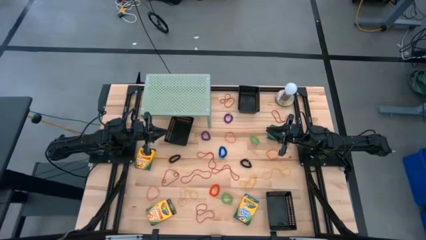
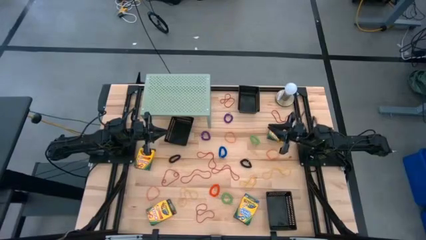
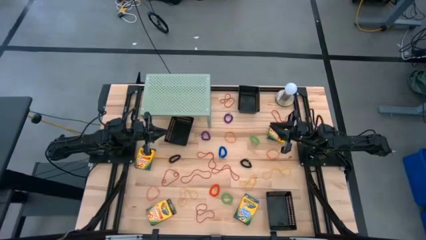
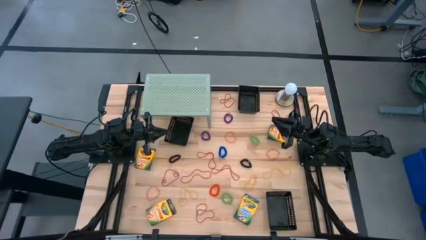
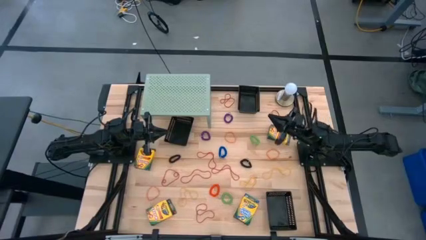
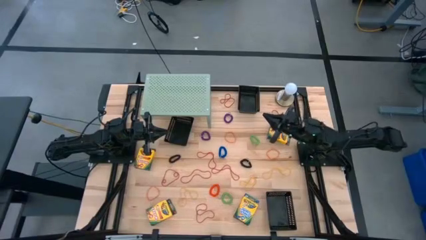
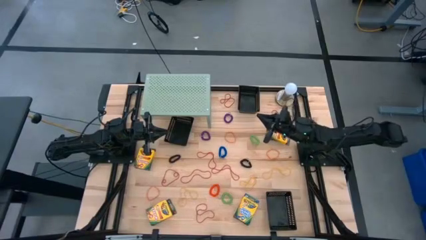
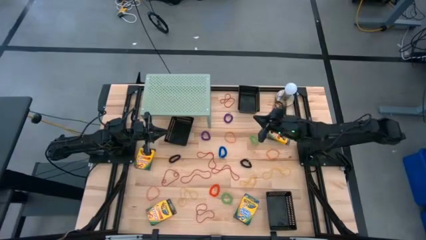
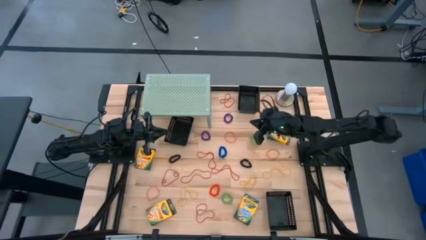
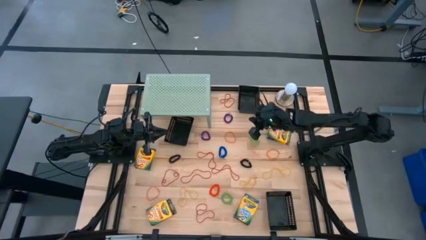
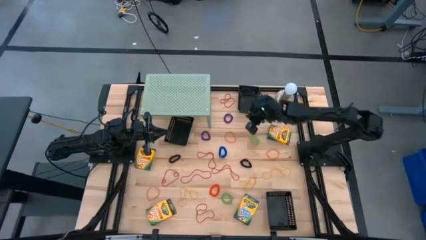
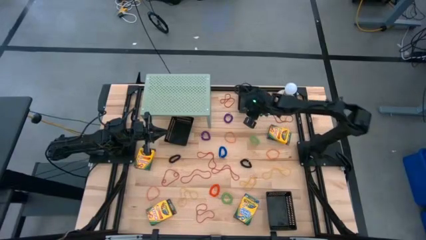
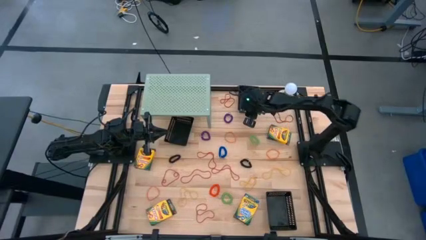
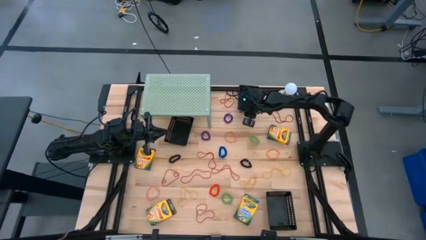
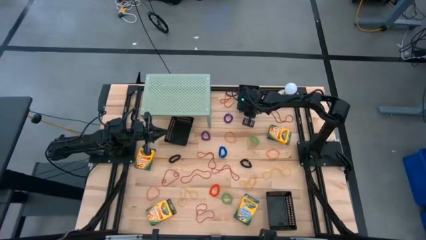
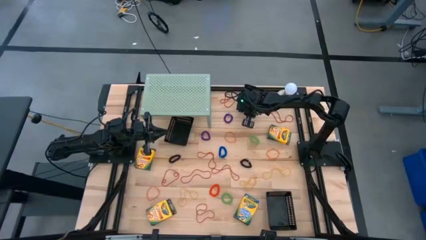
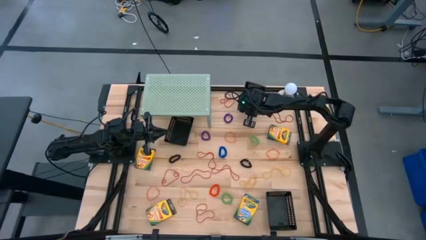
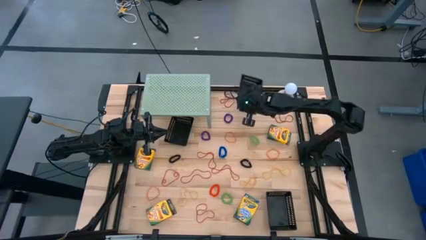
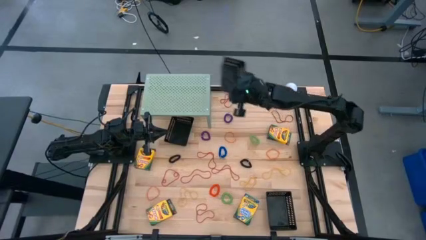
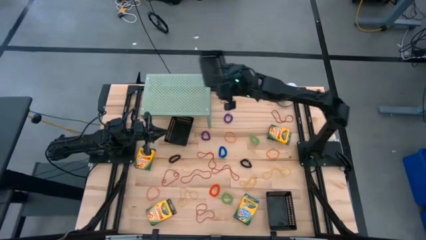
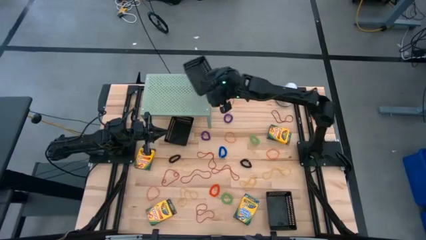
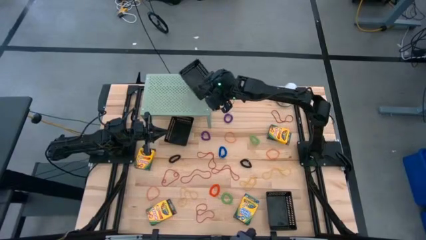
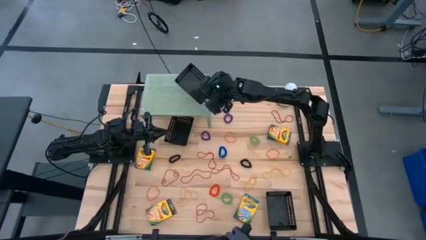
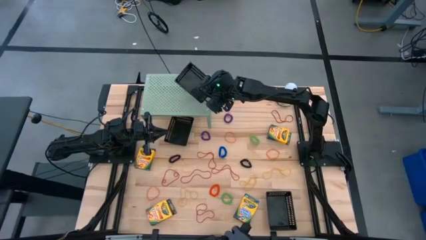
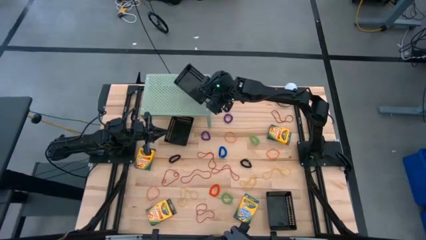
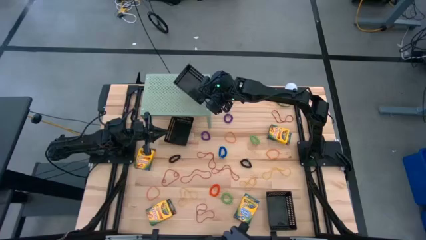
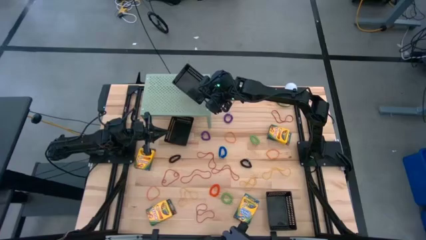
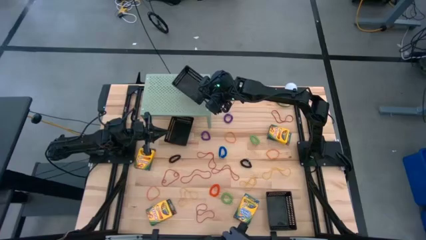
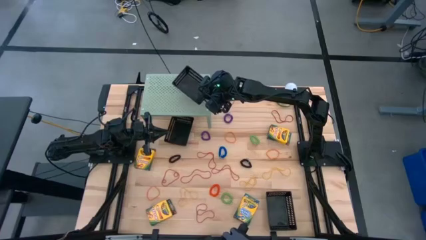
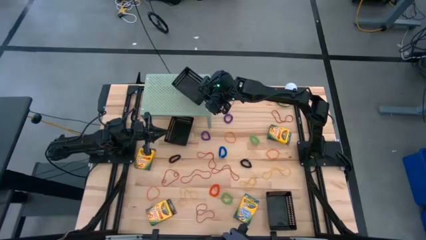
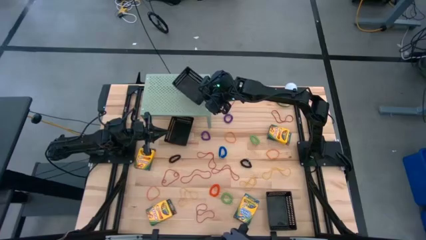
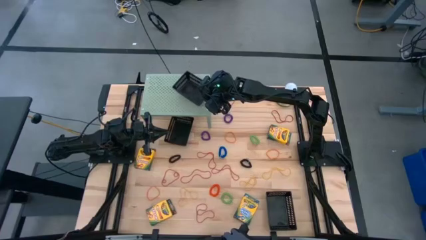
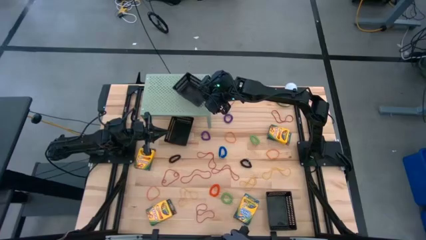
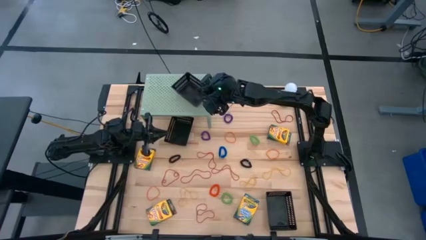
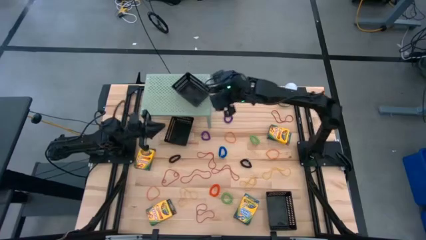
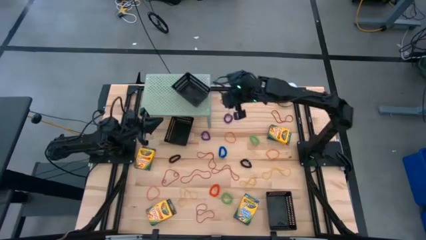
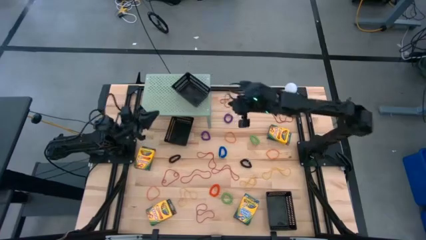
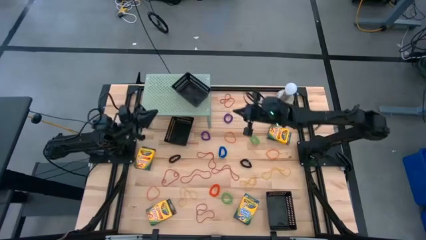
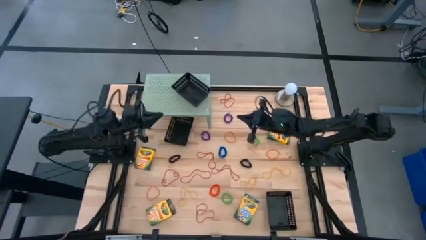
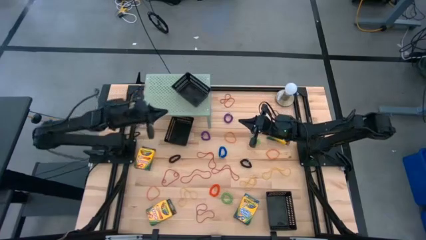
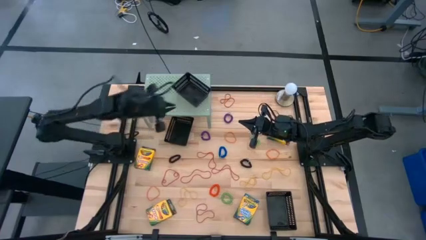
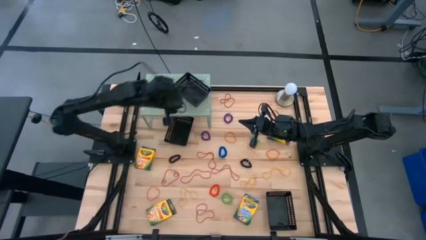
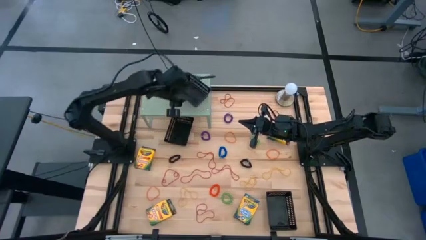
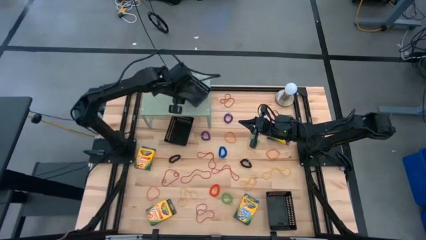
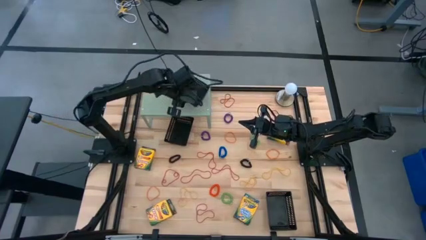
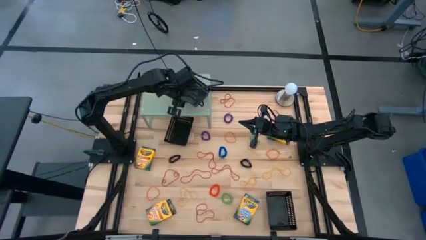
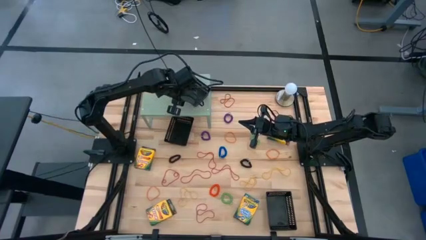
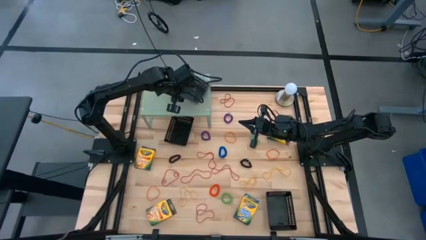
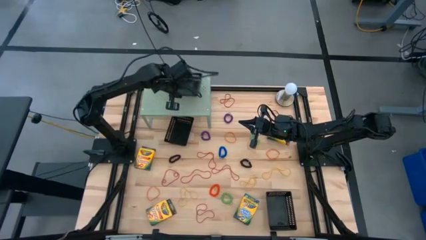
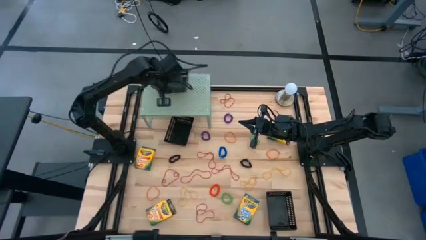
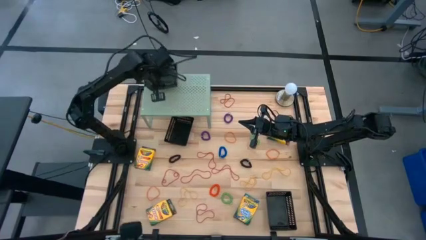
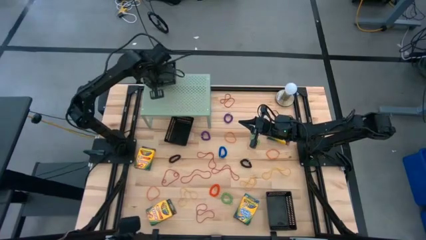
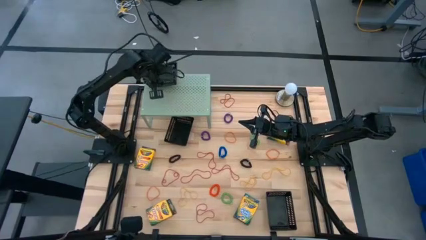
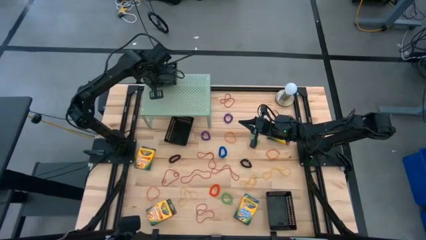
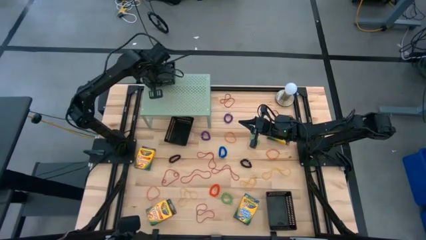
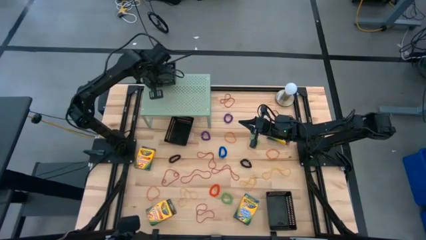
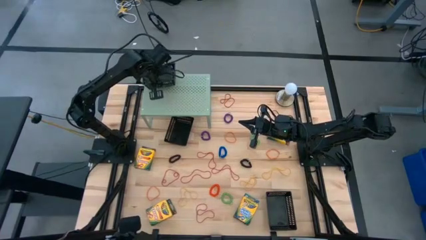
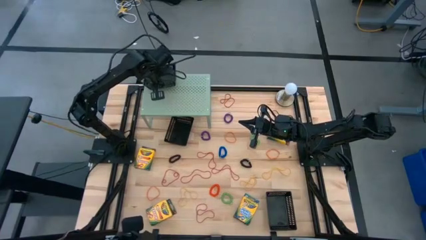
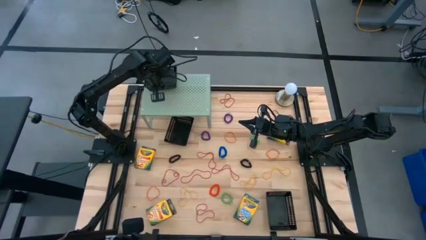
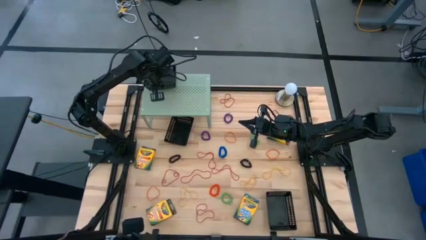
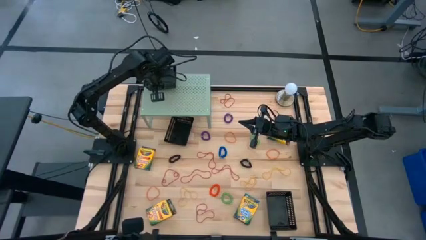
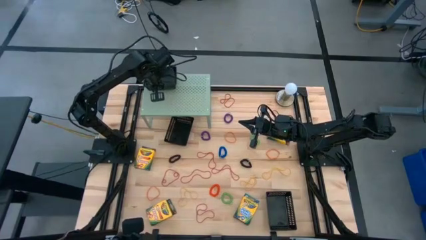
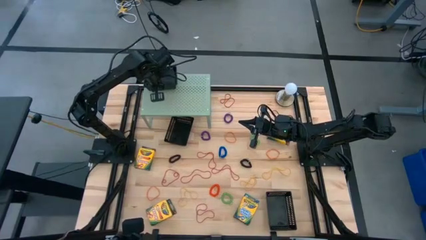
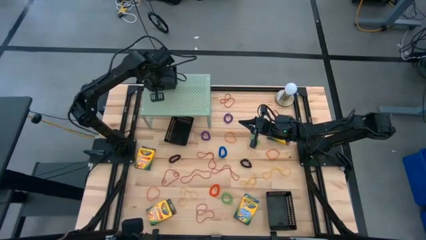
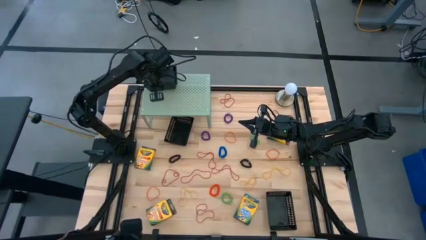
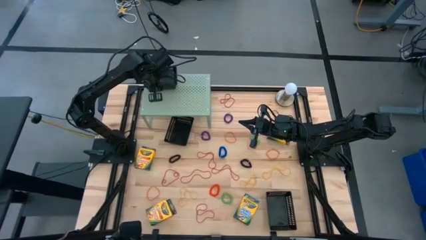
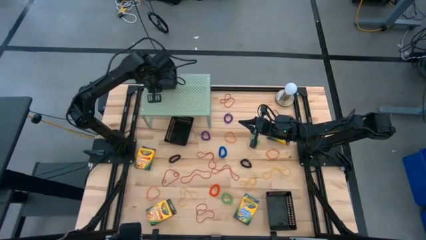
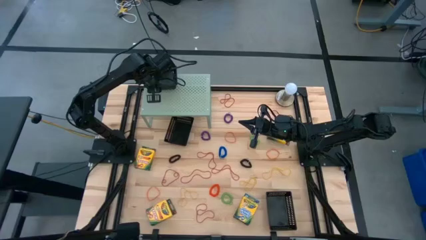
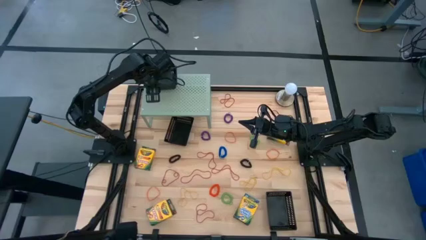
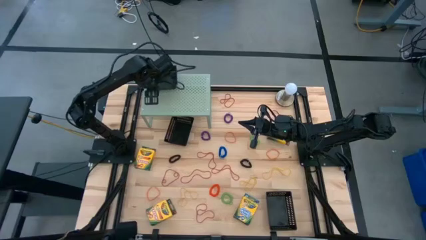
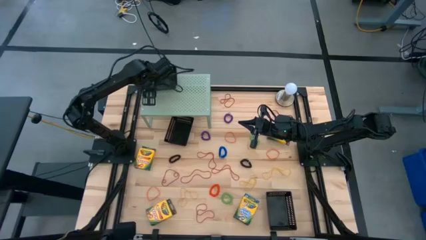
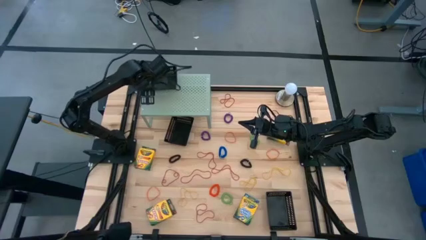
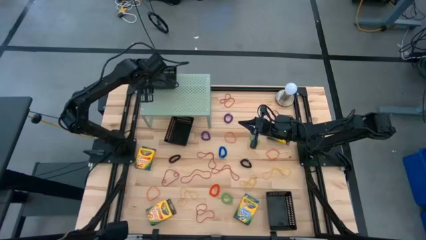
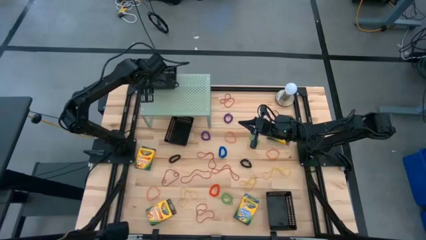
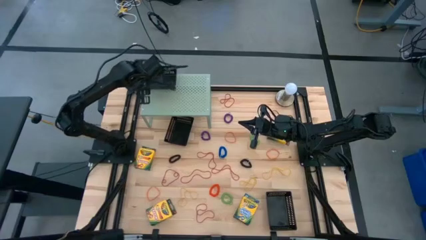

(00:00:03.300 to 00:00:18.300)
Task: Pick & Place Office Desk Supplies
Put the top black bin on the shelf
